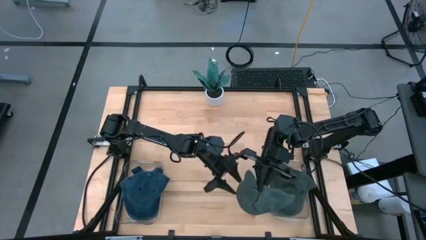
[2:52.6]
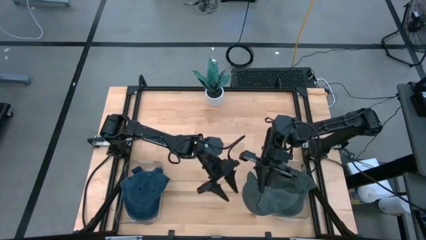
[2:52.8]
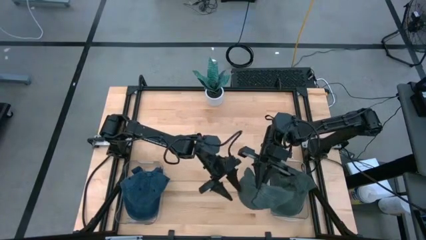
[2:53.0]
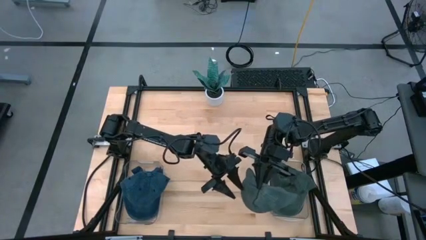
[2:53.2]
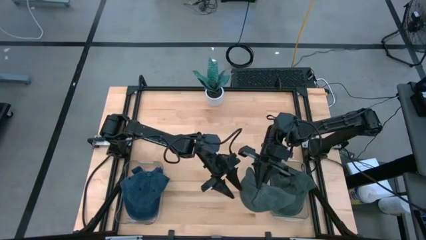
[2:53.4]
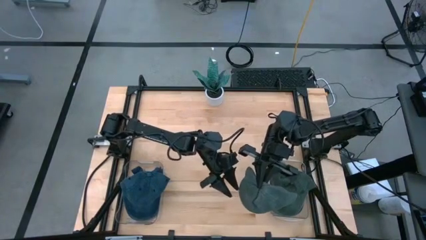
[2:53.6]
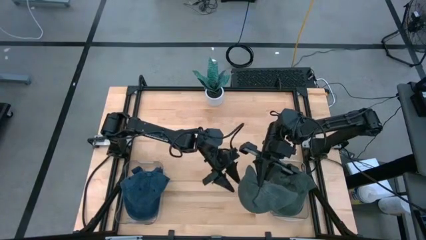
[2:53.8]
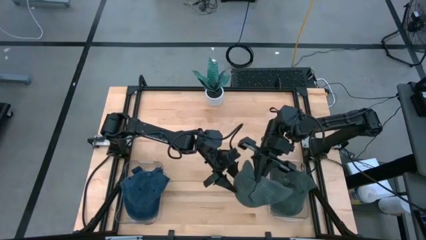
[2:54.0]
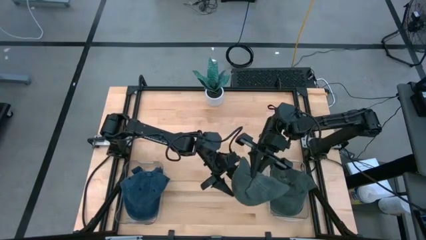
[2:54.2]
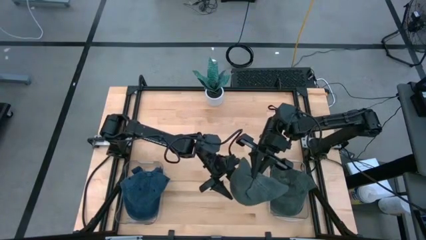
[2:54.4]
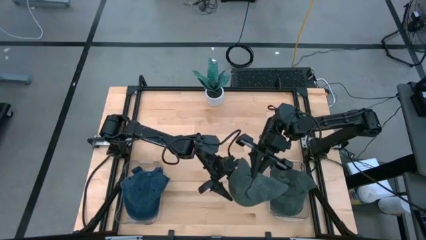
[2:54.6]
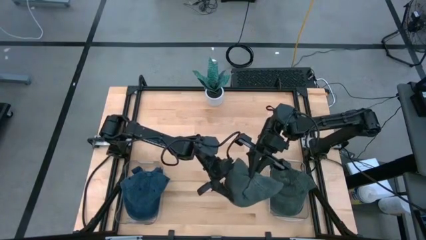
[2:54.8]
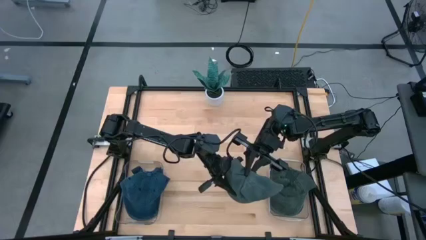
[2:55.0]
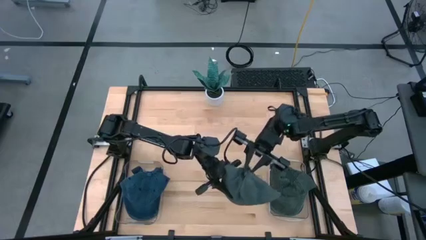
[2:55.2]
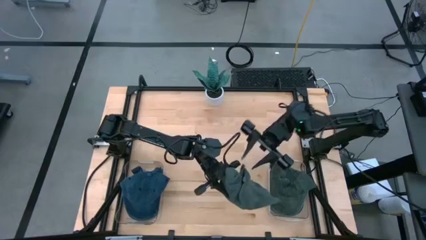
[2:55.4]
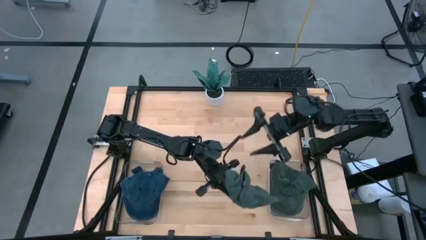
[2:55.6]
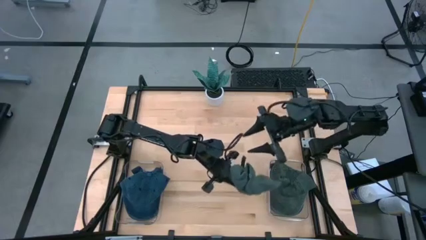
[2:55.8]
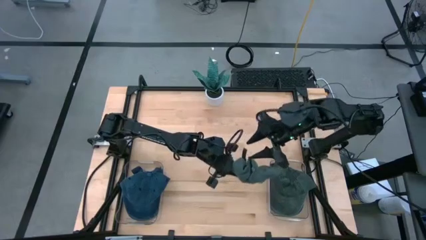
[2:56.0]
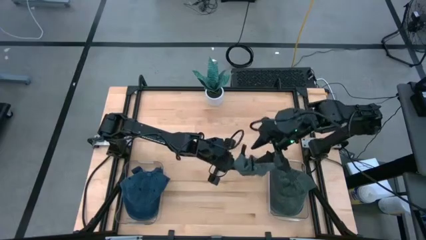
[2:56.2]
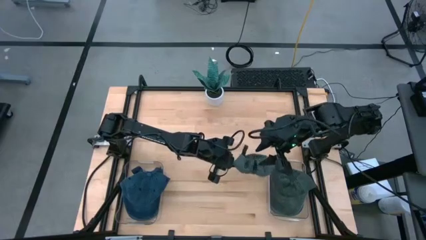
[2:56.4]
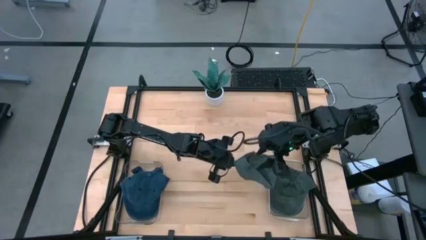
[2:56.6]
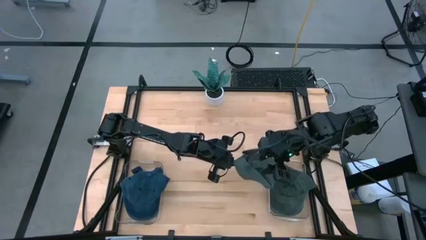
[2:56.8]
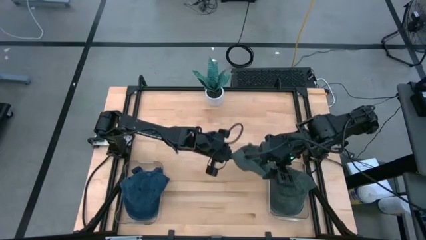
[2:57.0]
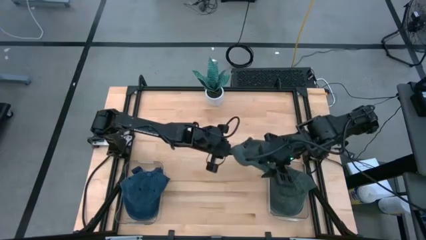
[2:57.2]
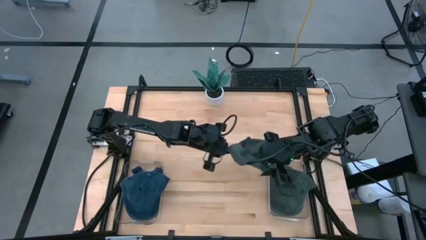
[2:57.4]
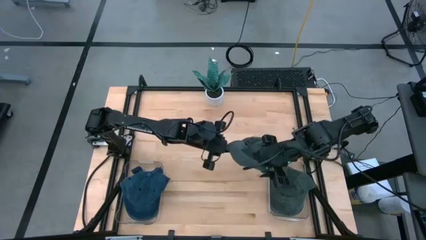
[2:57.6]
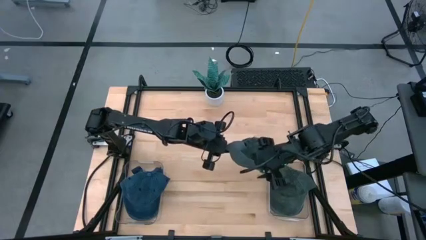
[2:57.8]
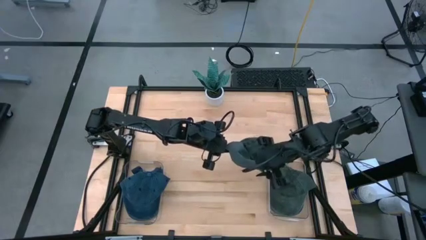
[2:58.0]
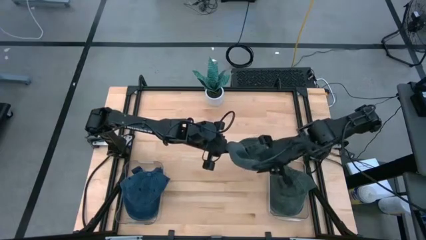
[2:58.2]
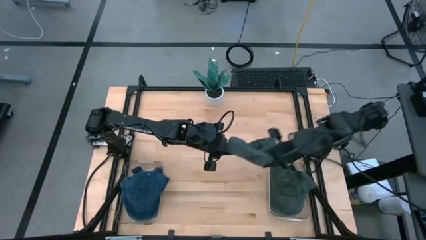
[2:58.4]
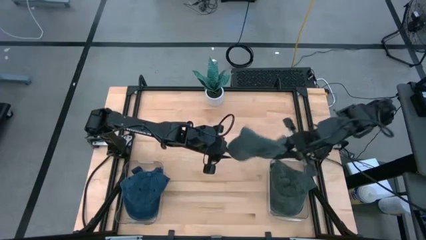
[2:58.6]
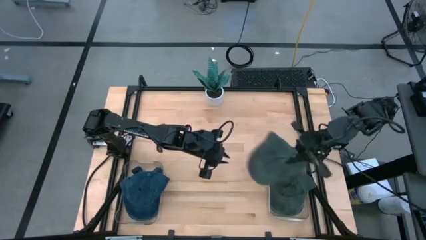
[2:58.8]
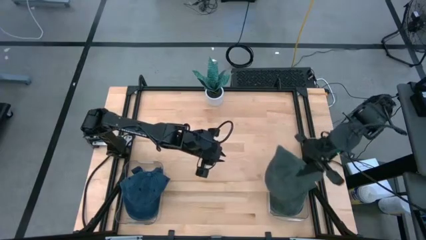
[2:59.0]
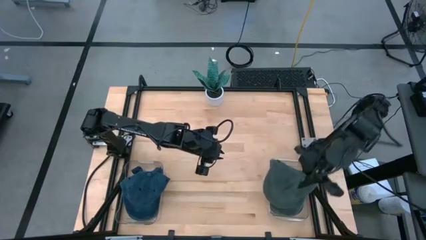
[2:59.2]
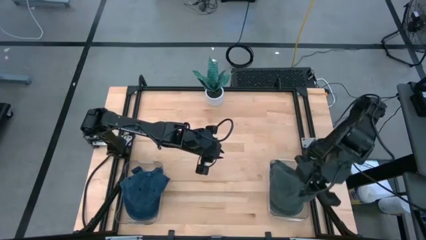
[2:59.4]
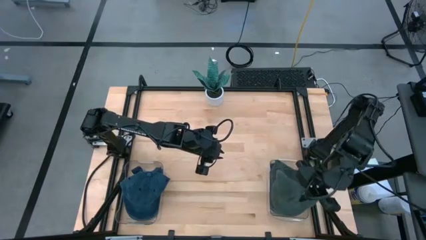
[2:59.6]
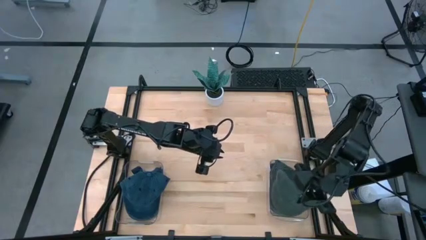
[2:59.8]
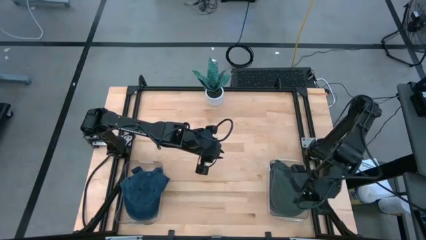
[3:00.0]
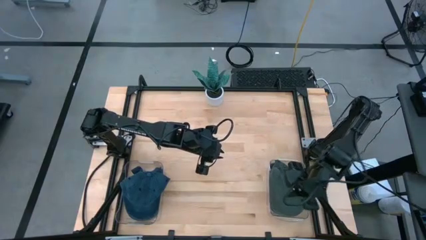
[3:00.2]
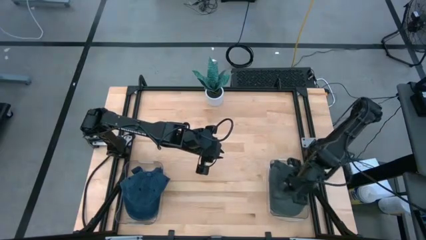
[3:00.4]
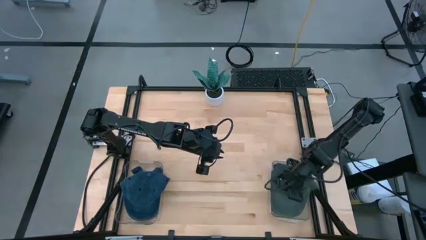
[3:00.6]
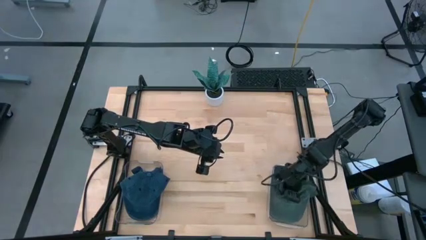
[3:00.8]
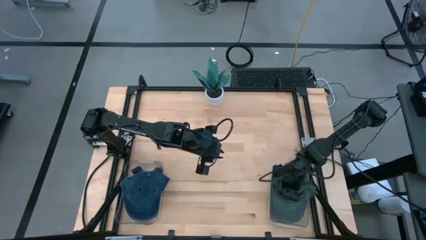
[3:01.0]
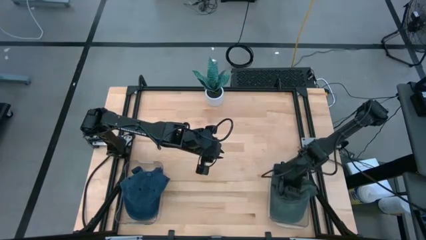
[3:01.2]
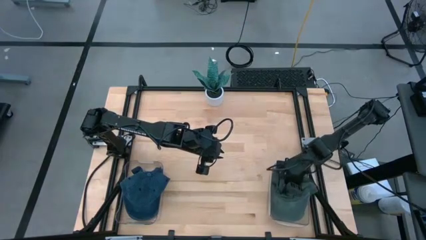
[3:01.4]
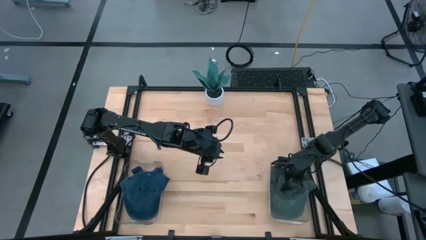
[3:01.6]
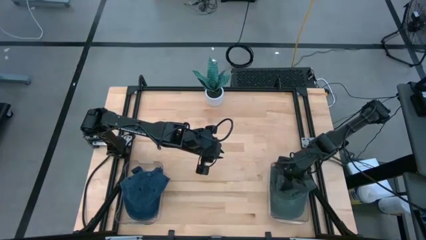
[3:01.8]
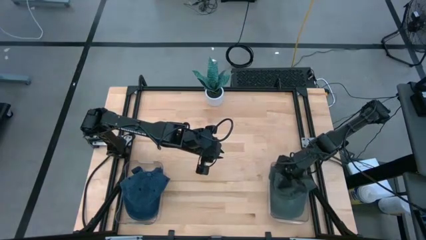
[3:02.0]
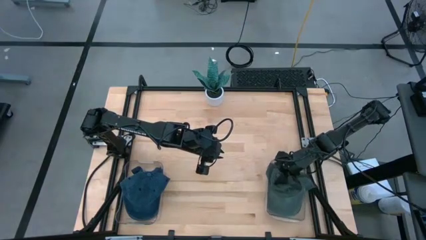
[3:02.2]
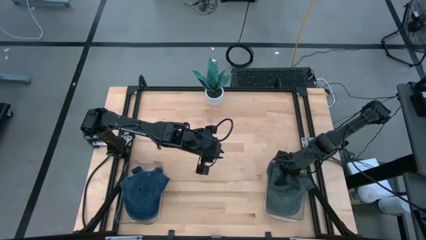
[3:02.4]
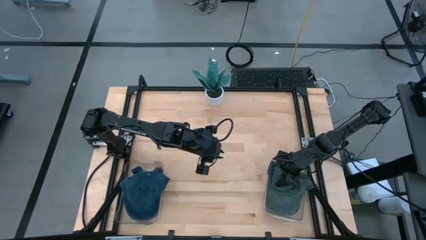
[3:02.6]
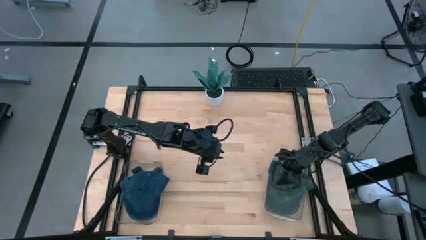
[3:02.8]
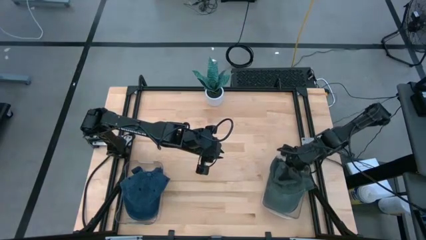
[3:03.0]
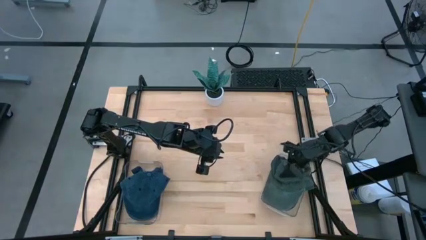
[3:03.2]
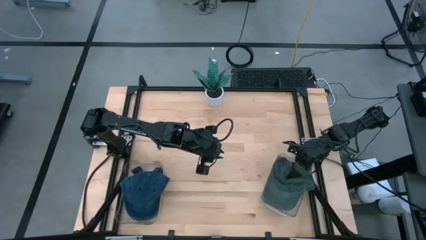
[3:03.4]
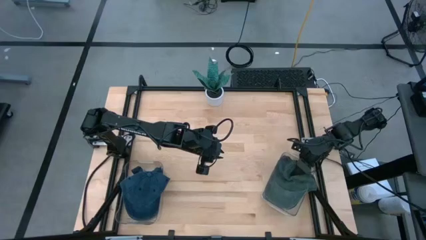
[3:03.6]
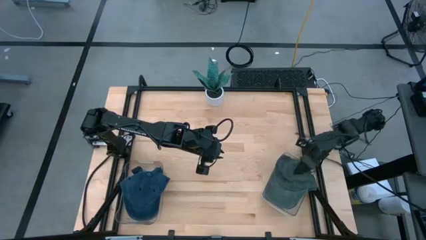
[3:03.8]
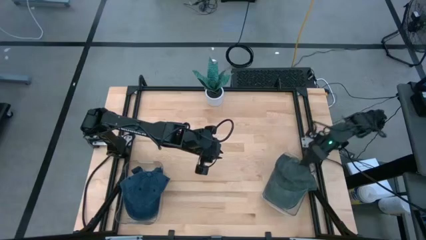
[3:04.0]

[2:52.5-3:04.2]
Task: Pick & Place hat
Put the gray cap into the right transparent bin

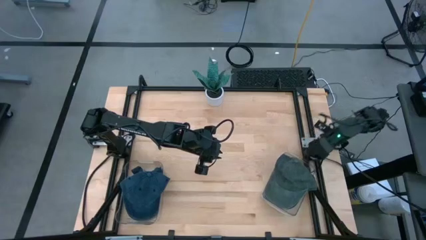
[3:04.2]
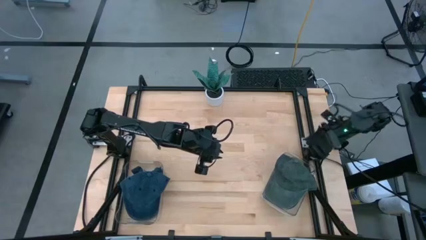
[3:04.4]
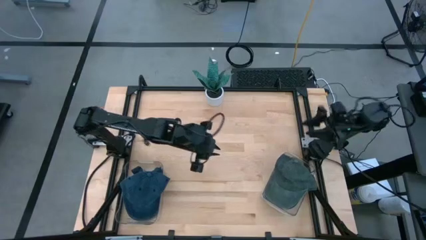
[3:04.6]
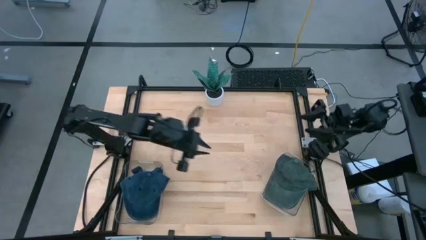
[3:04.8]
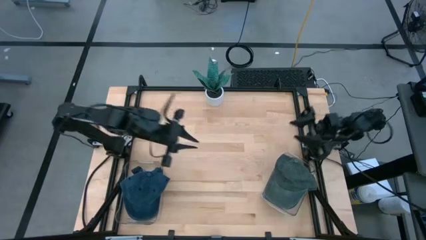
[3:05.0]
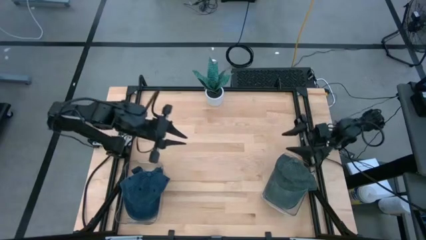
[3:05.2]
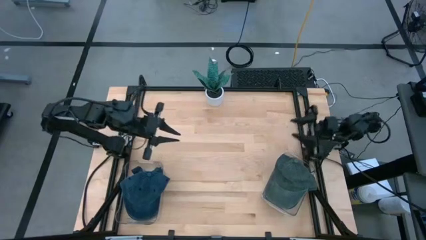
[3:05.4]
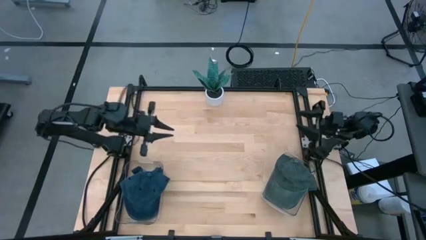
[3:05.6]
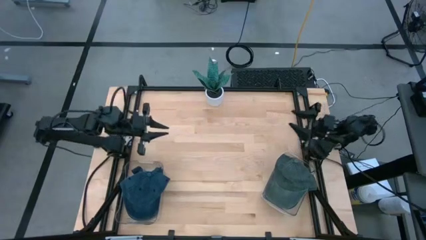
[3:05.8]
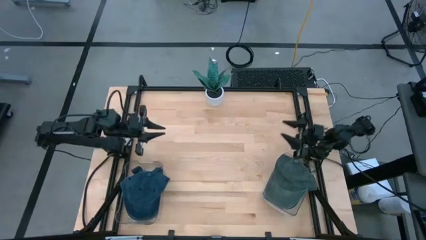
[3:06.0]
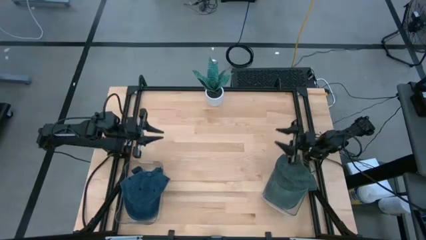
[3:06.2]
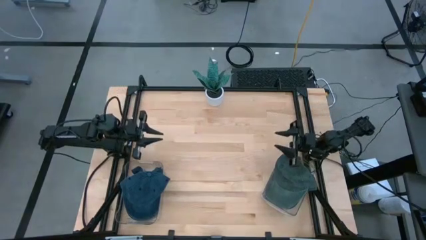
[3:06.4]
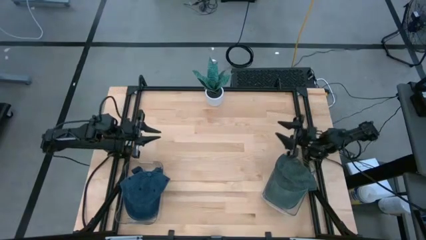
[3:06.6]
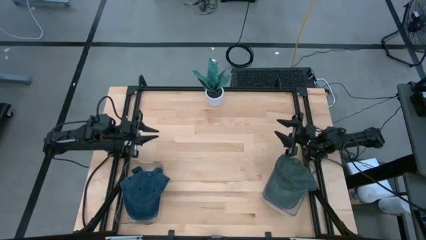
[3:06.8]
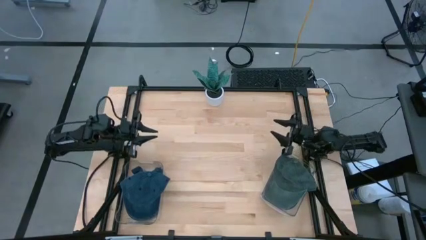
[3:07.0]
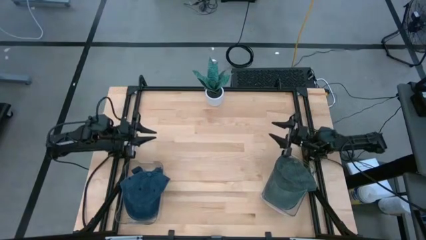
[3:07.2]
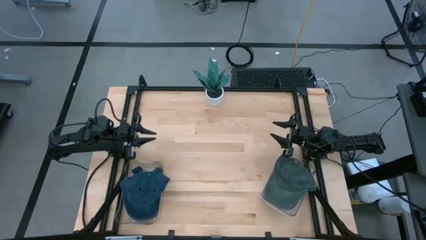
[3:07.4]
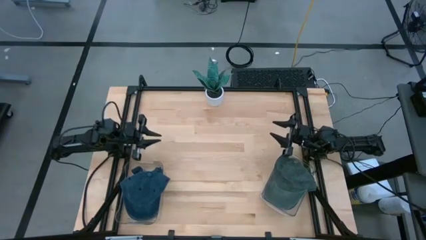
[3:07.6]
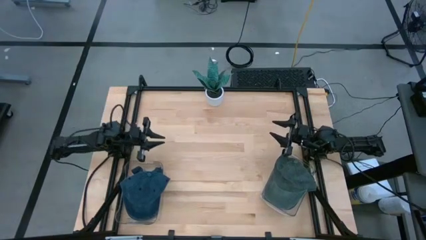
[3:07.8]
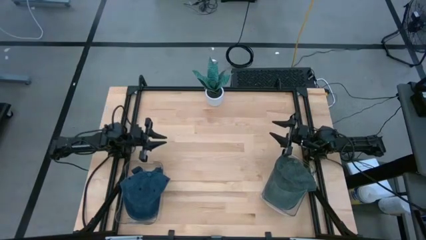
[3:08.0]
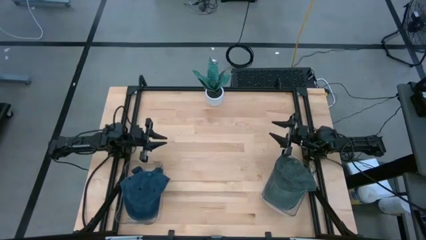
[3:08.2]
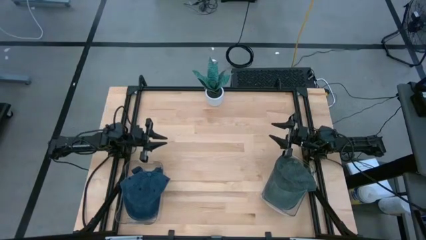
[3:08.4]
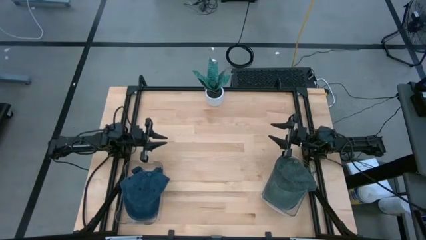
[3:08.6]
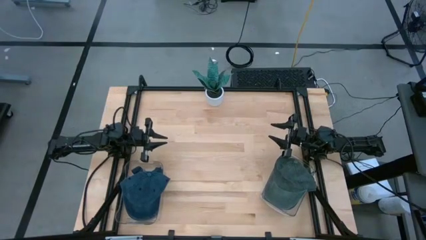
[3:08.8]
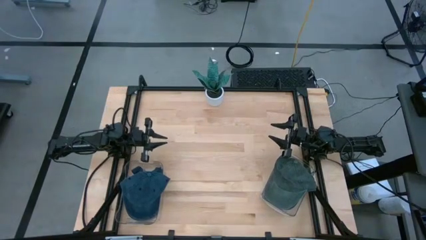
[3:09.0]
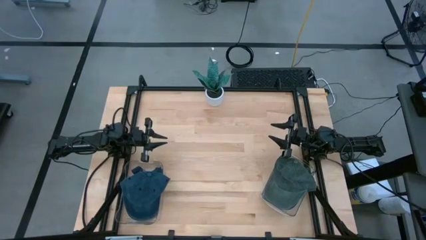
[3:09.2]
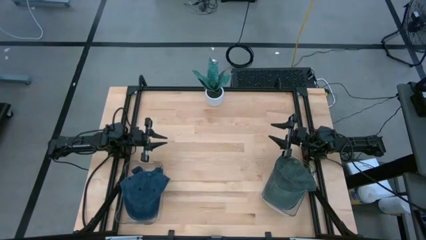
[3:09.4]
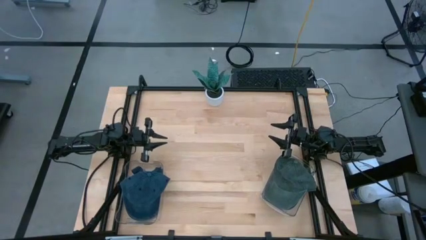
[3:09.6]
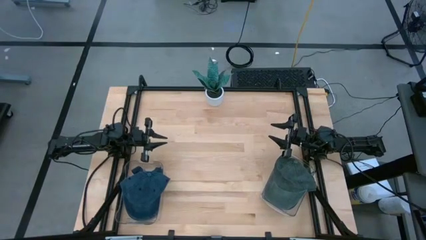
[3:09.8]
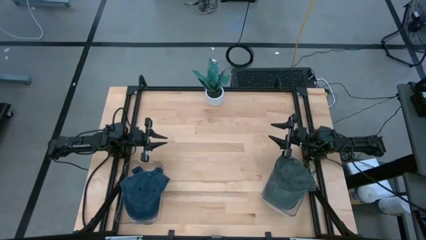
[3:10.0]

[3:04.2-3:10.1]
Return to Home Position
